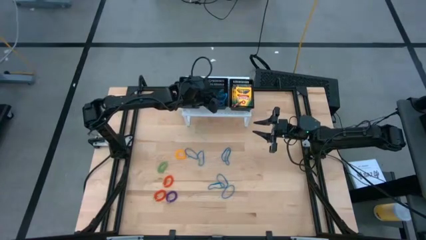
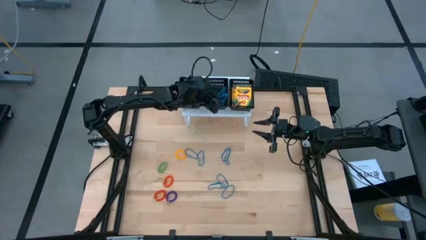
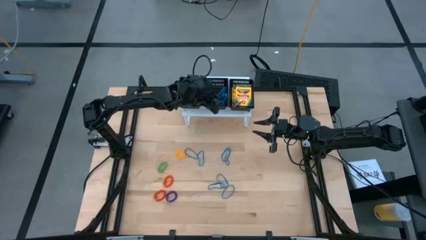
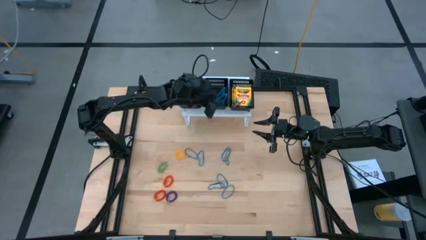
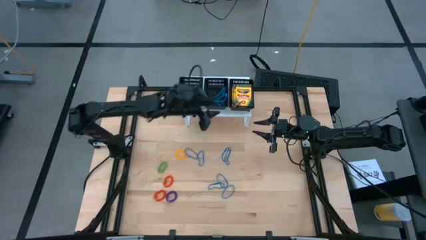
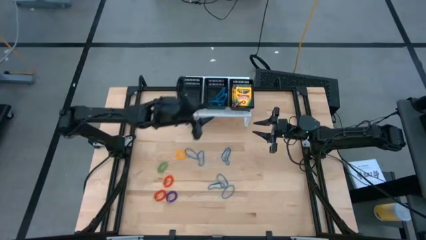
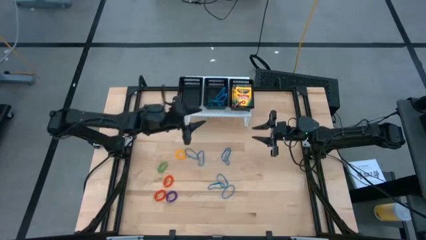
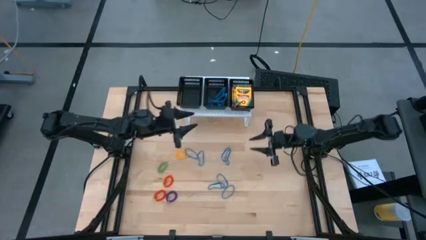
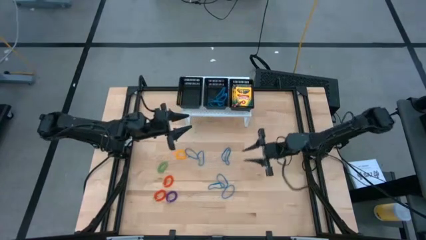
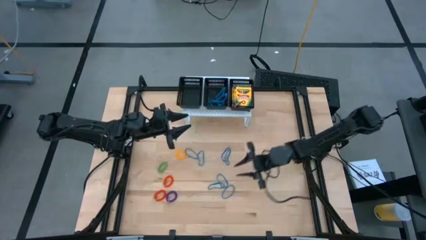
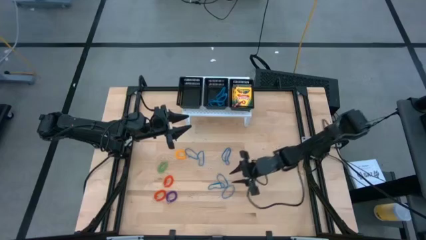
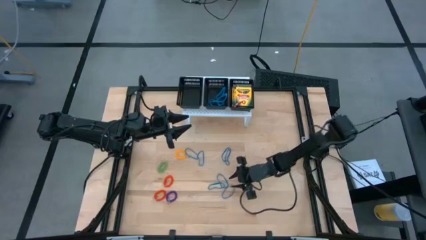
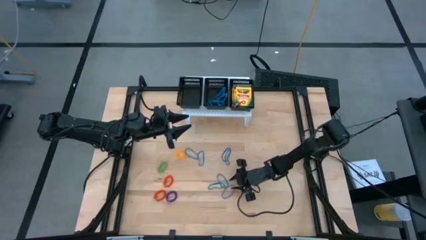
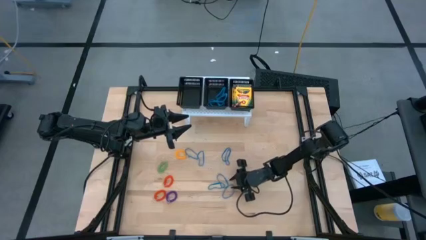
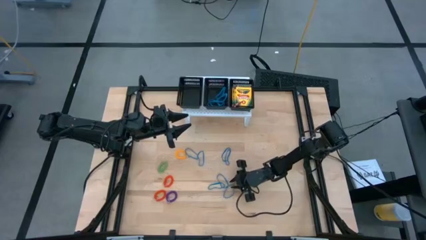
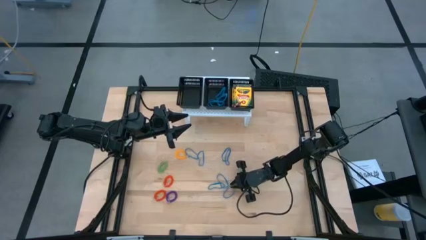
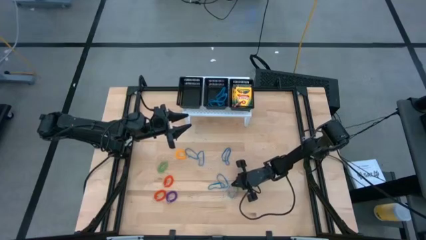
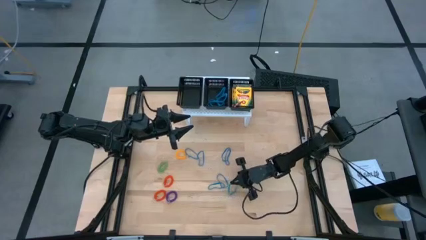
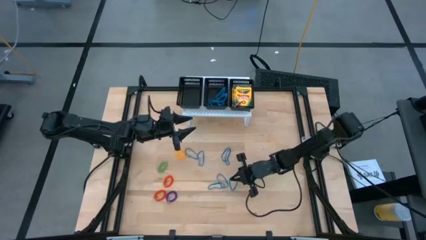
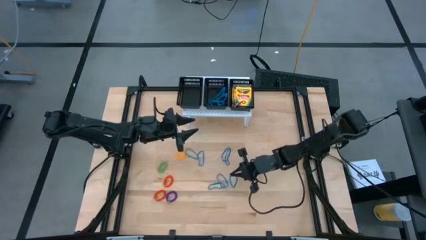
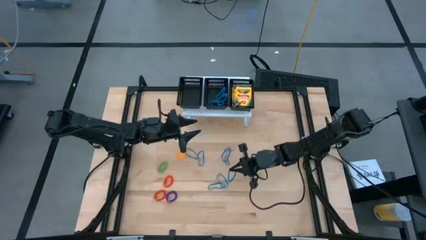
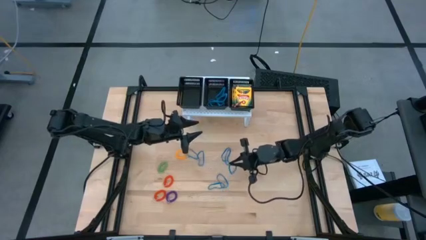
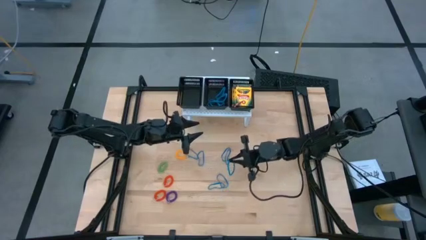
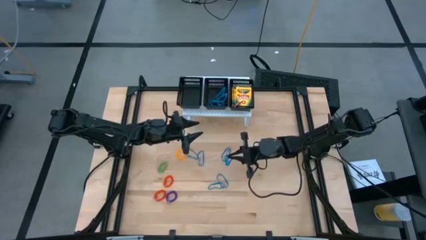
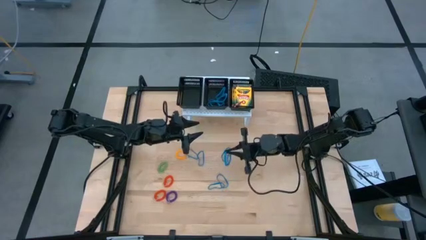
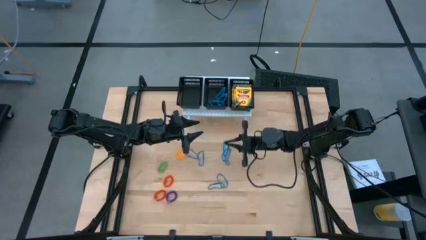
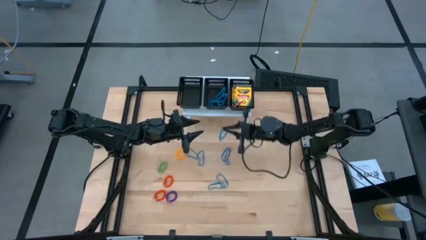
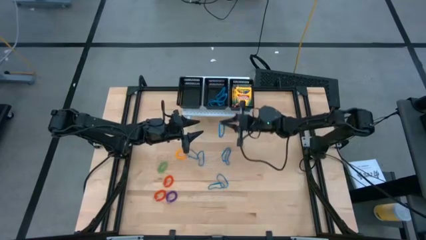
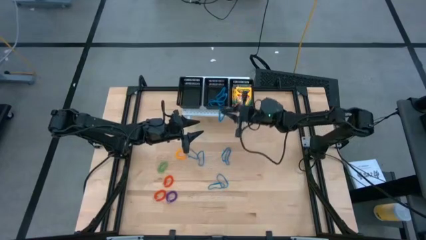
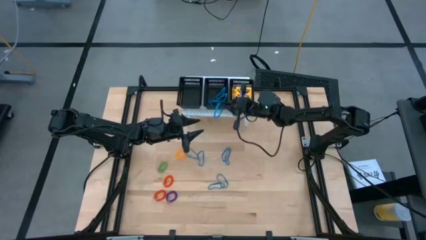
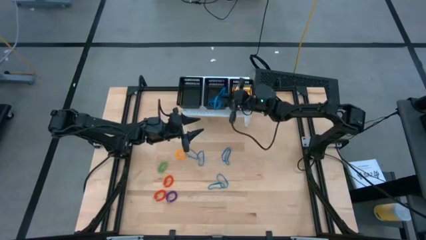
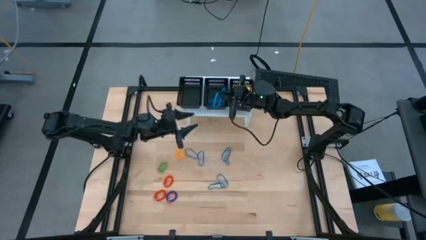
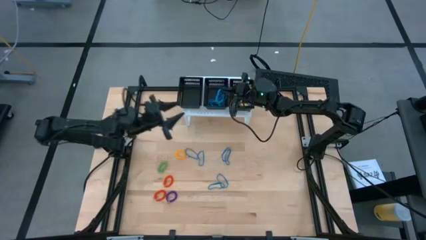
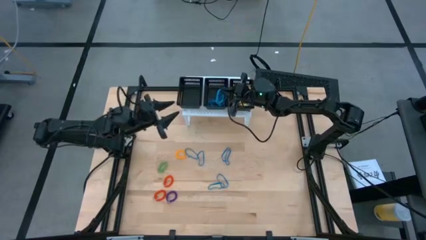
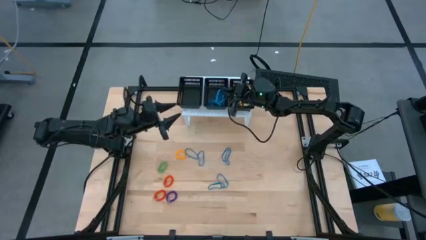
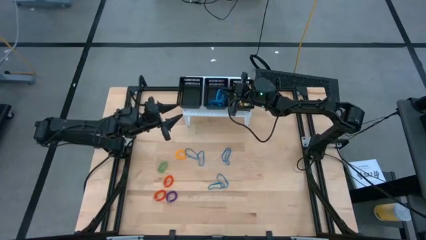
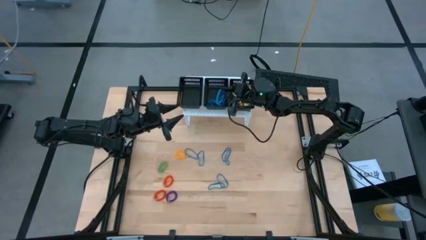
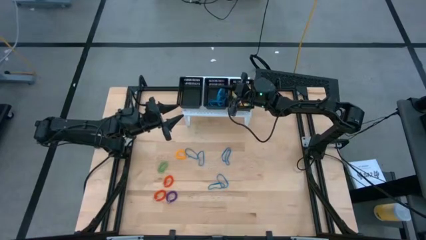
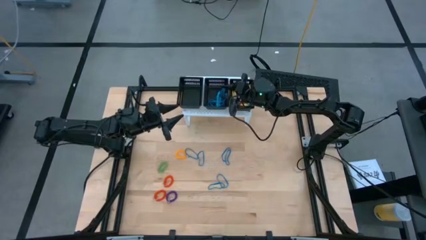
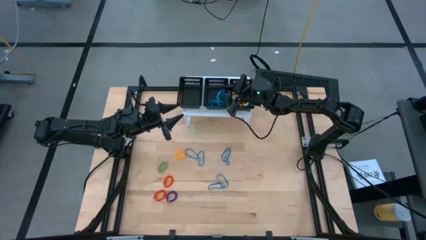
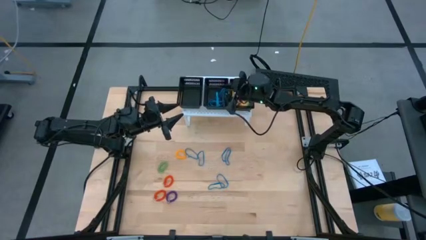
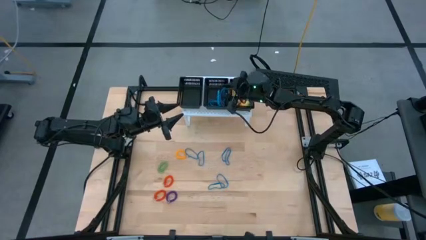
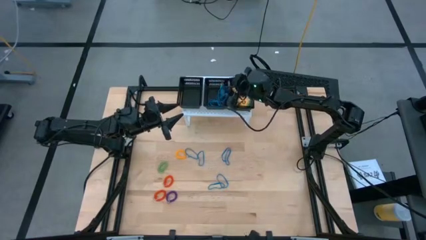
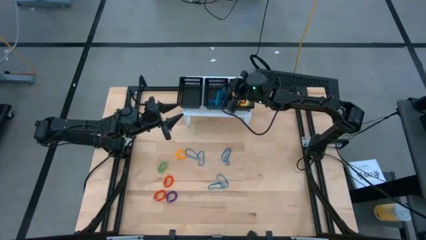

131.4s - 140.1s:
Task: Pick & Place Office Desk Supplies
Put the blue rubber band into the middle black bin

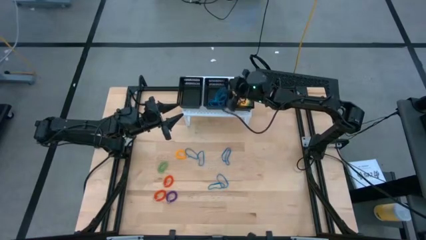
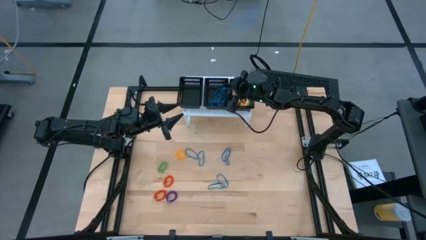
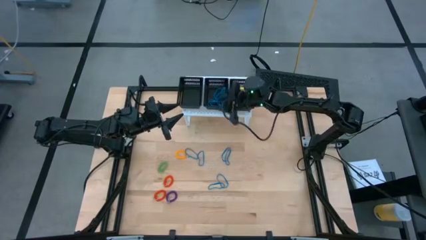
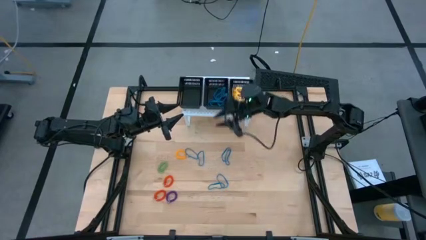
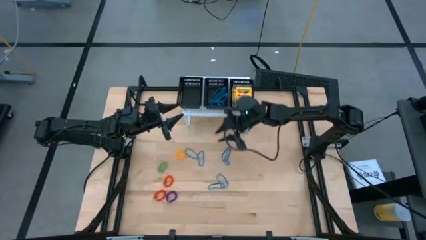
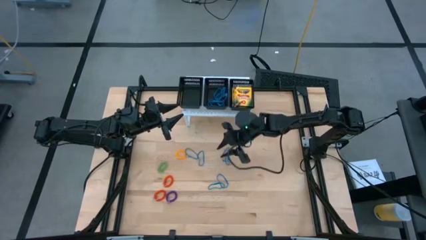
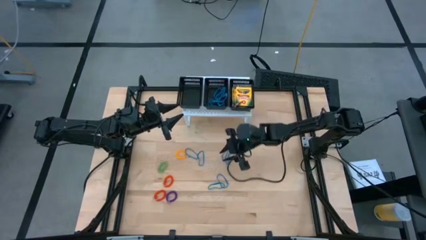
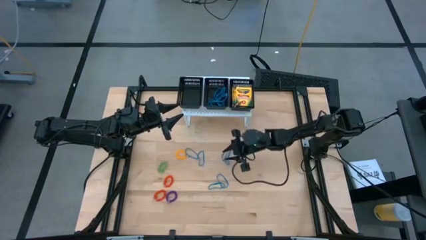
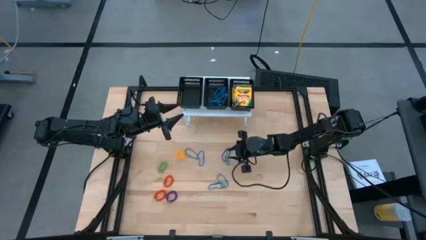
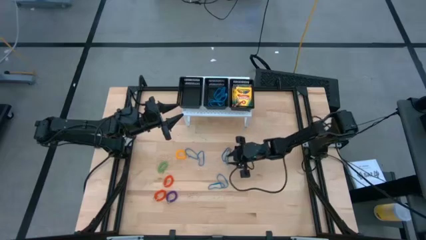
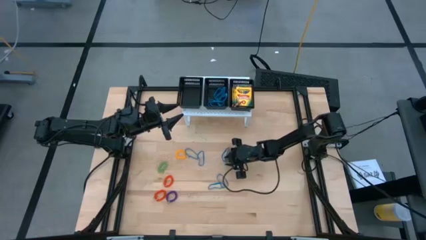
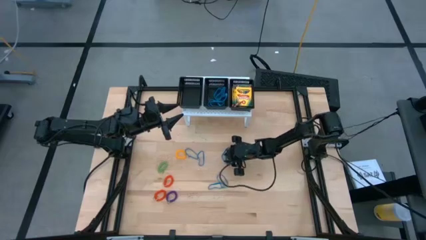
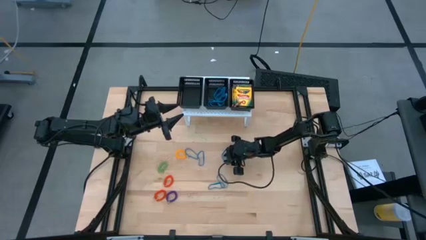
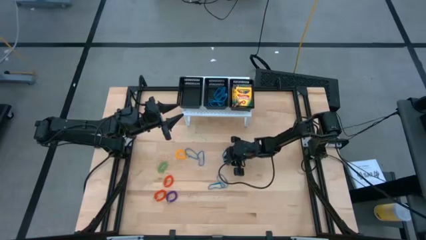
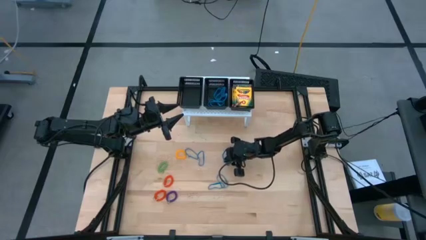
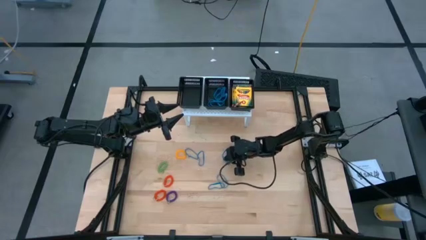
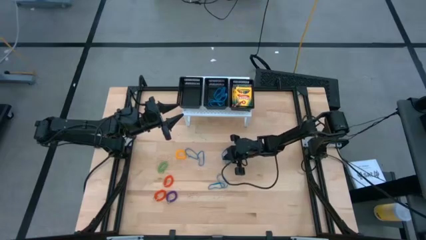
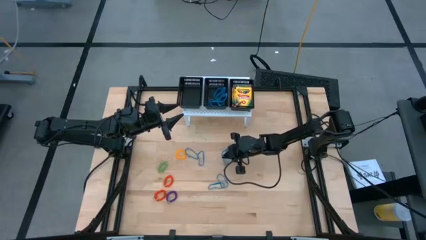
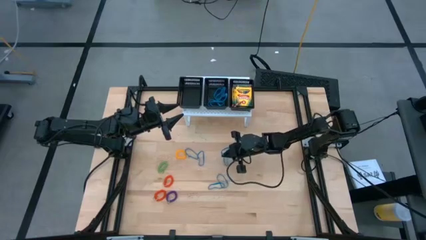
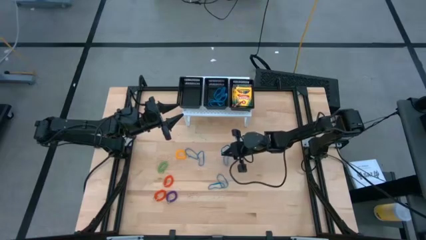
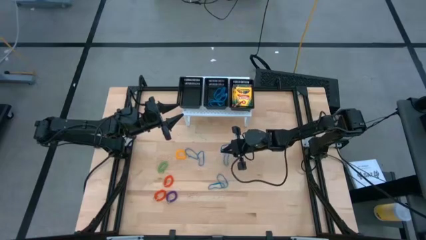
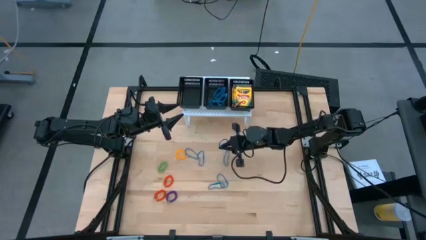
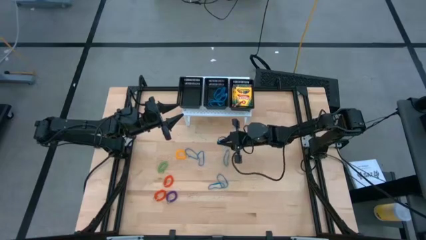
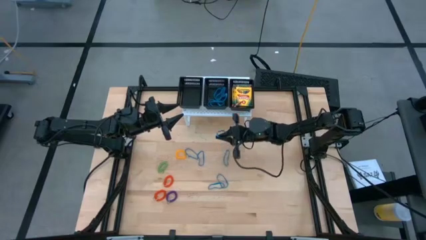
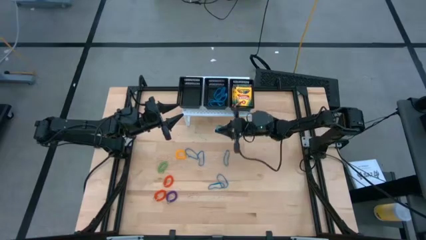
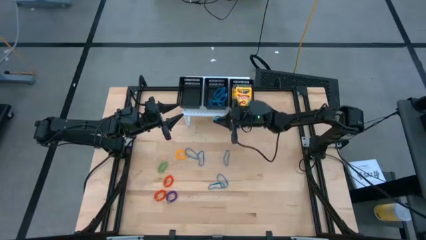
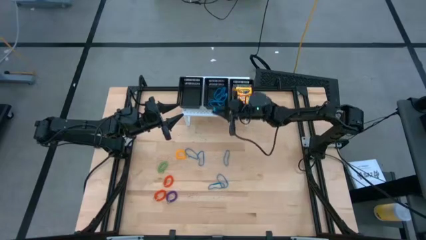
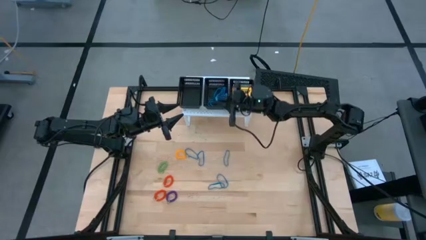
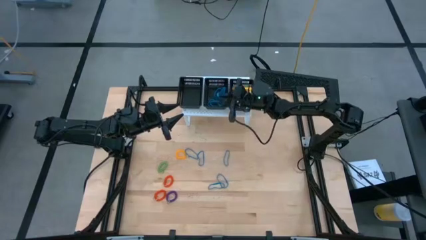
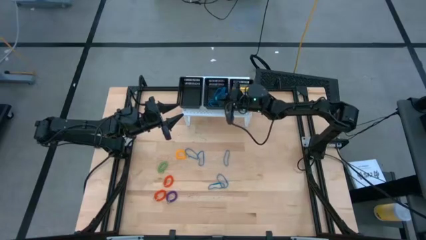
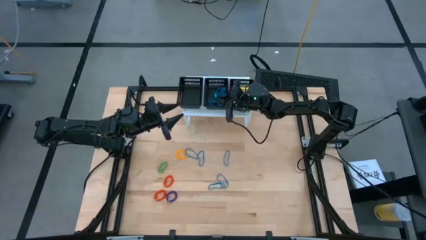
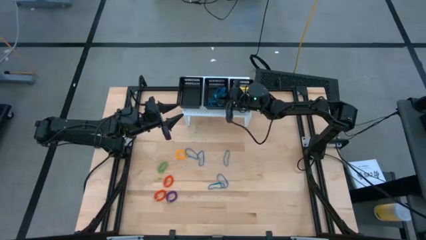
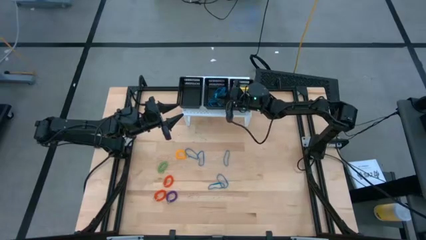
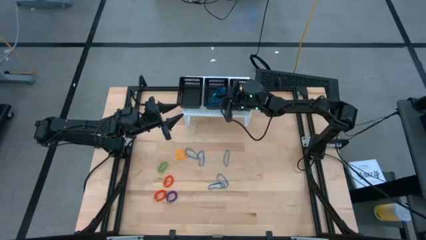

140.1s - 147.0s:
Put the blue rubber band into the middle black bin
